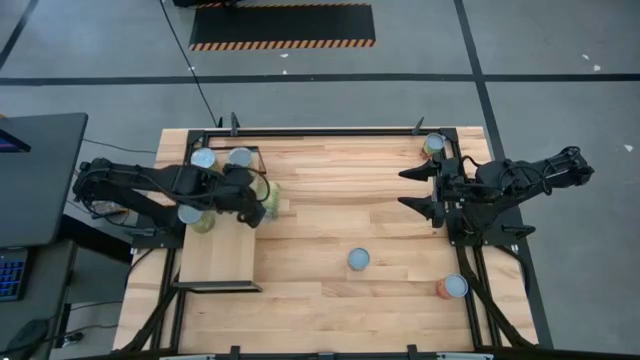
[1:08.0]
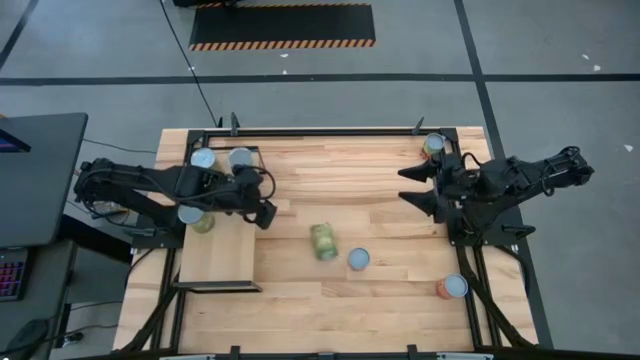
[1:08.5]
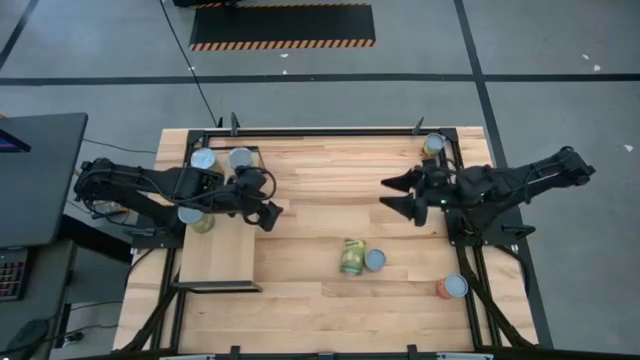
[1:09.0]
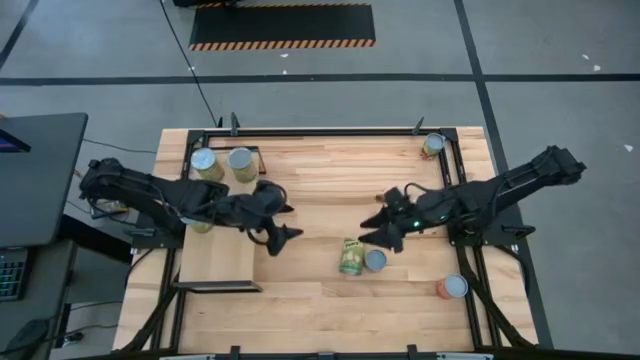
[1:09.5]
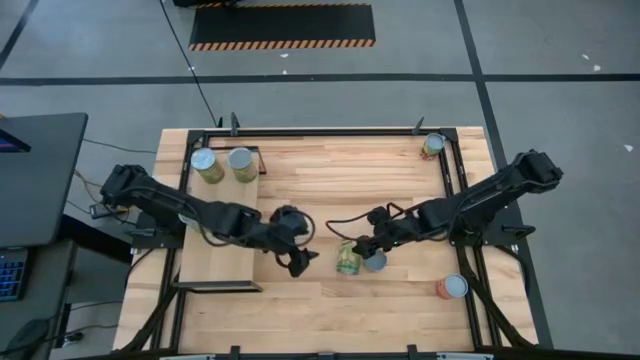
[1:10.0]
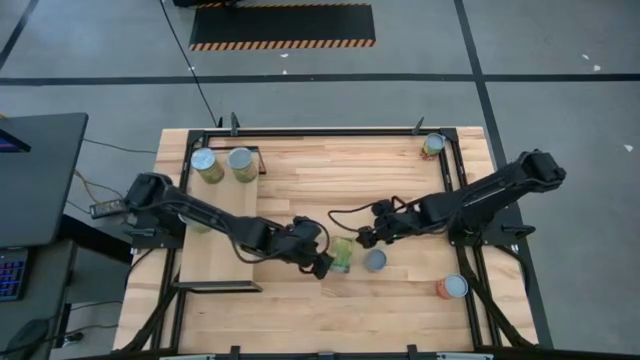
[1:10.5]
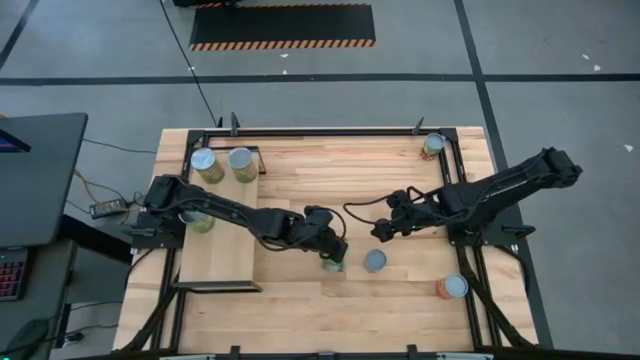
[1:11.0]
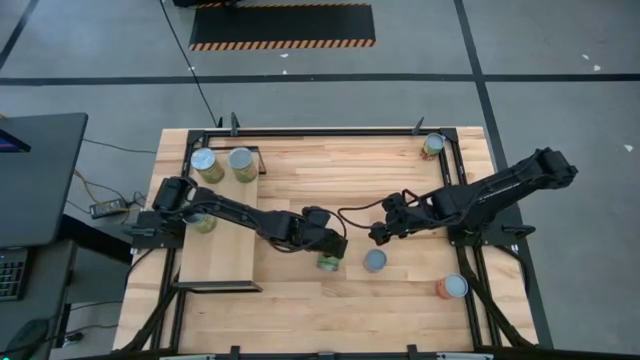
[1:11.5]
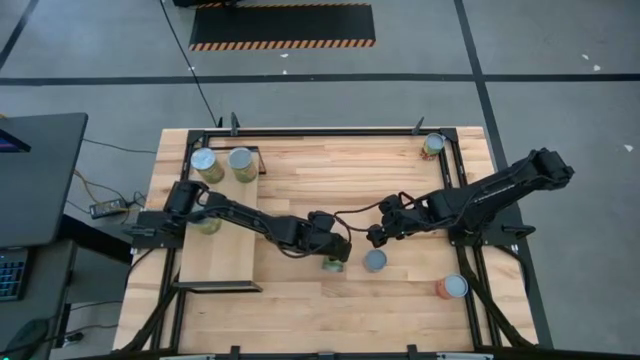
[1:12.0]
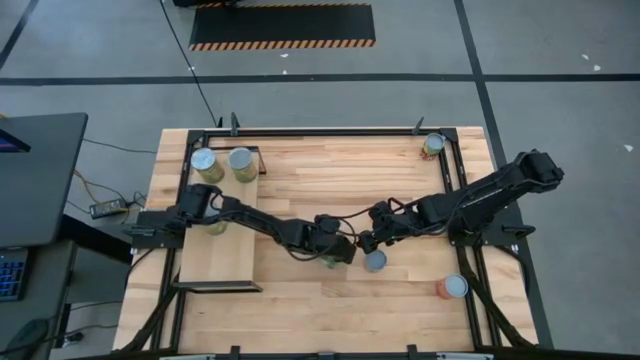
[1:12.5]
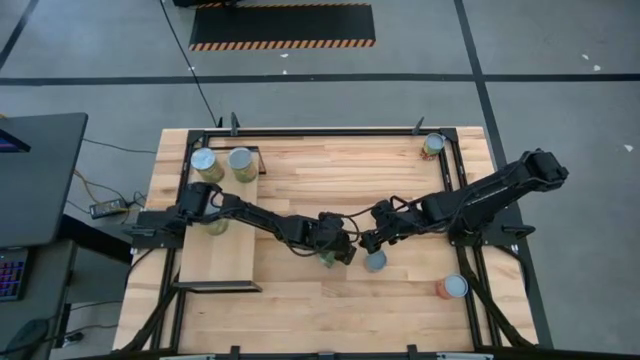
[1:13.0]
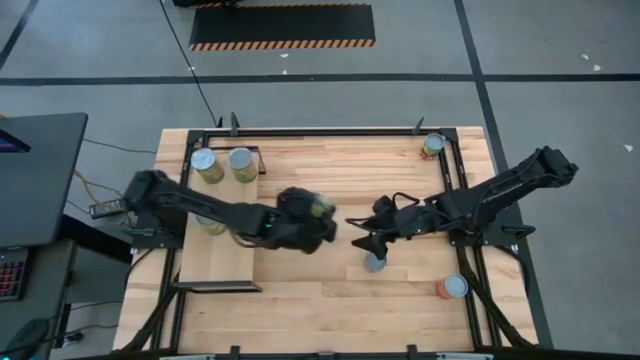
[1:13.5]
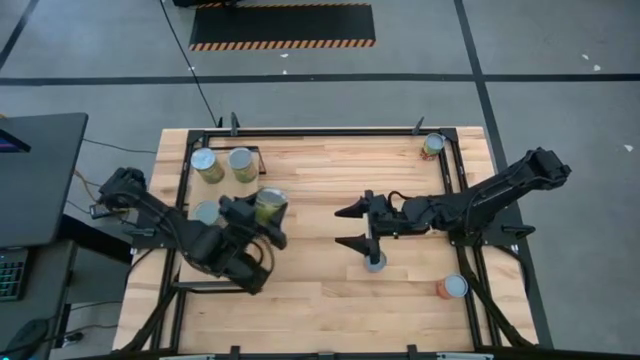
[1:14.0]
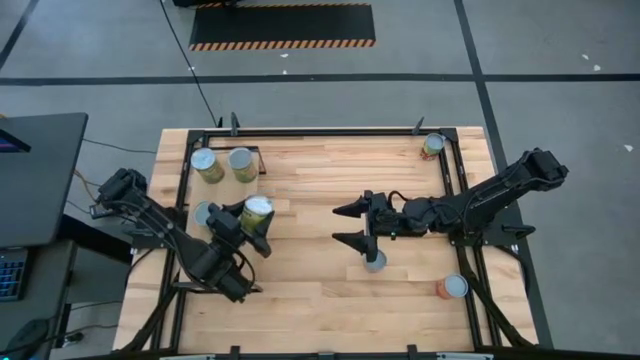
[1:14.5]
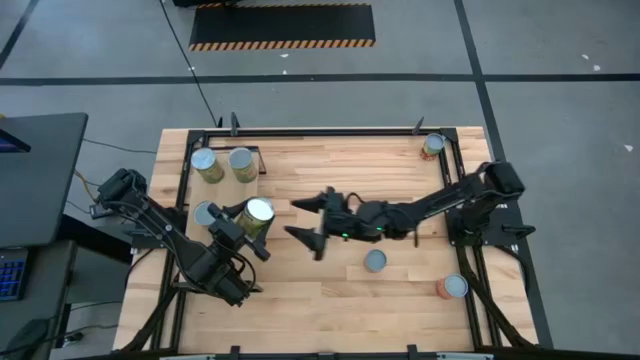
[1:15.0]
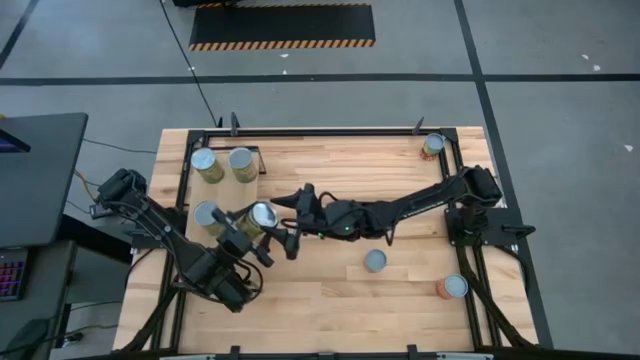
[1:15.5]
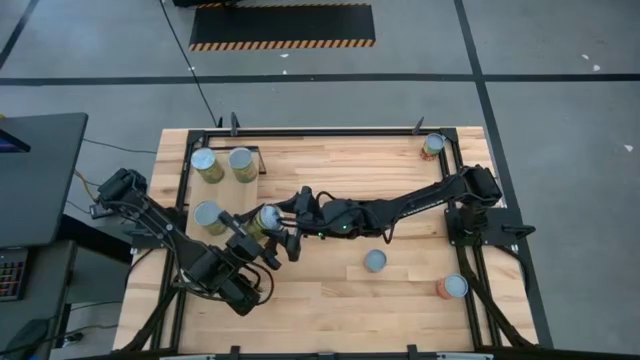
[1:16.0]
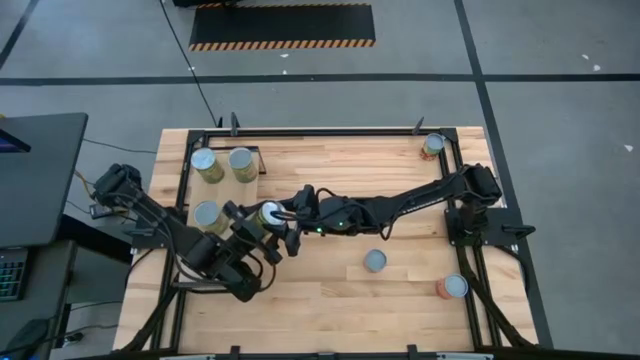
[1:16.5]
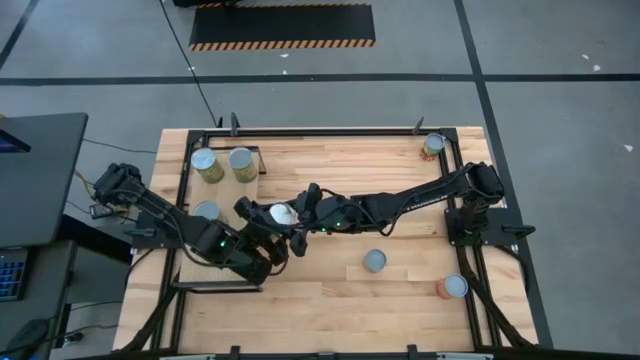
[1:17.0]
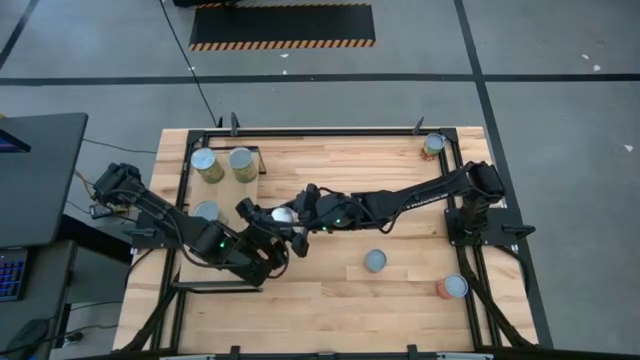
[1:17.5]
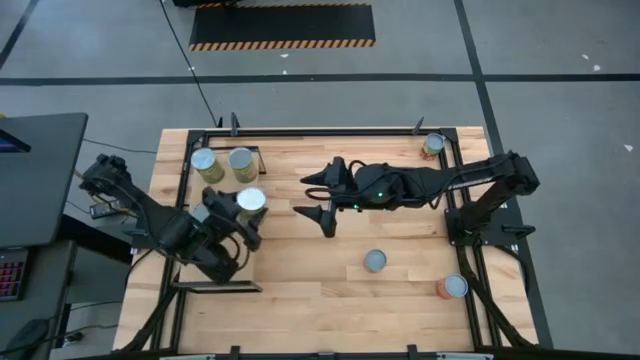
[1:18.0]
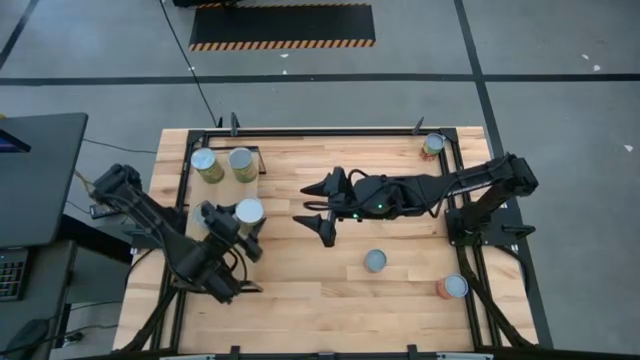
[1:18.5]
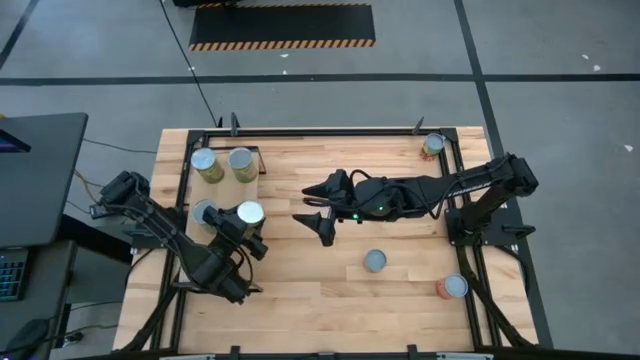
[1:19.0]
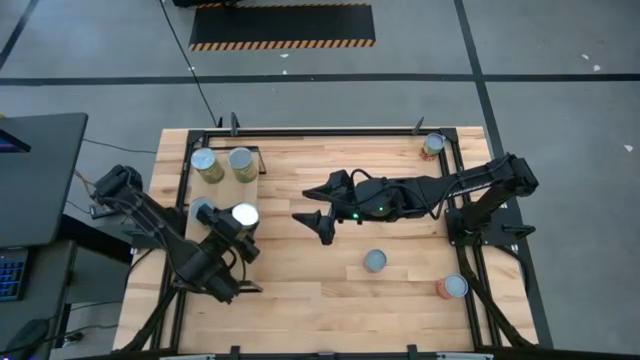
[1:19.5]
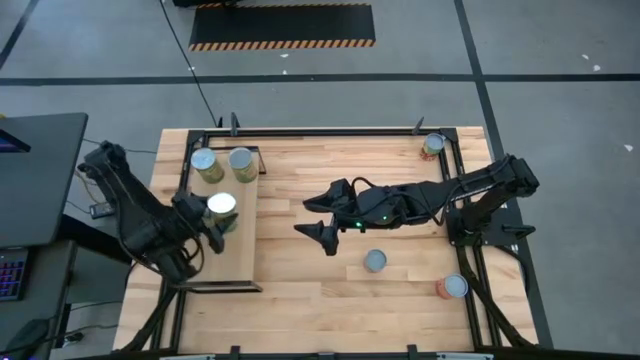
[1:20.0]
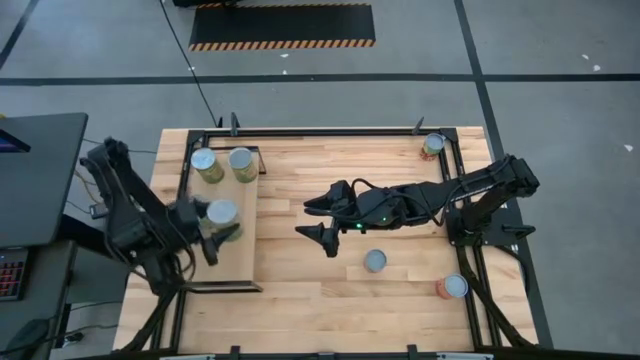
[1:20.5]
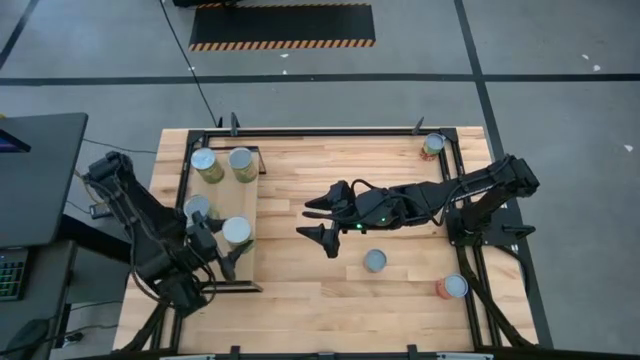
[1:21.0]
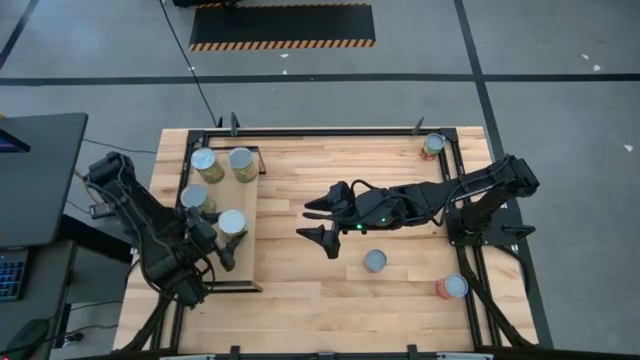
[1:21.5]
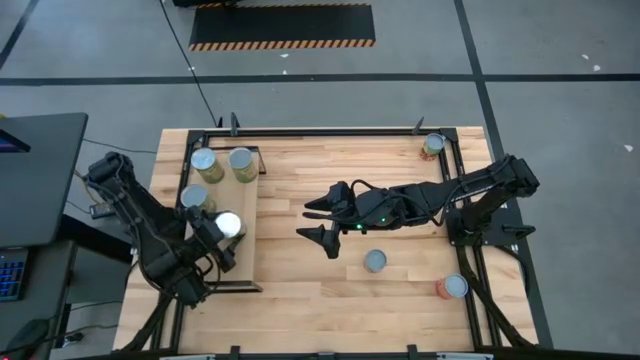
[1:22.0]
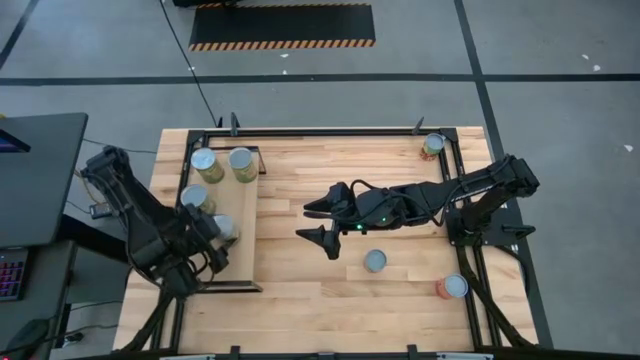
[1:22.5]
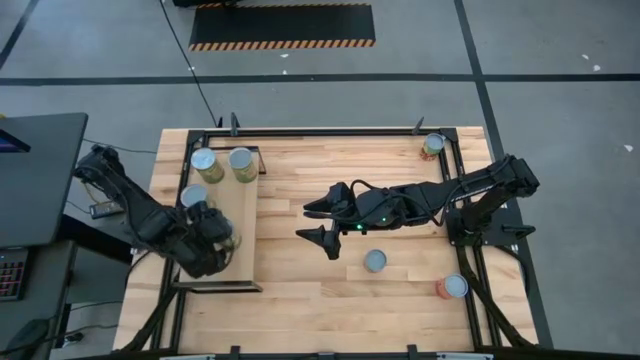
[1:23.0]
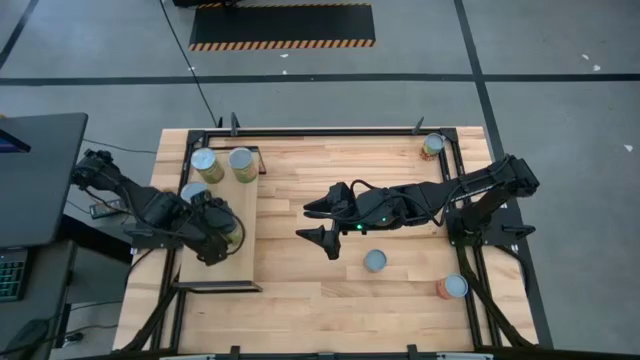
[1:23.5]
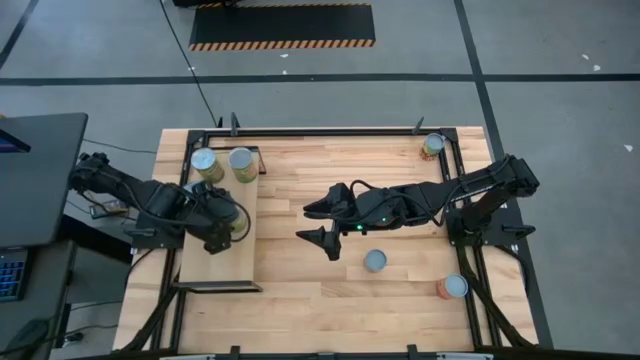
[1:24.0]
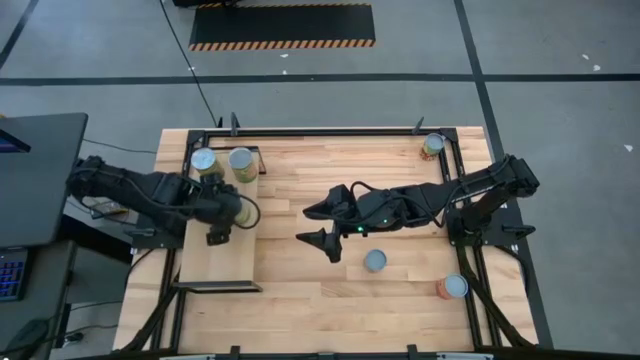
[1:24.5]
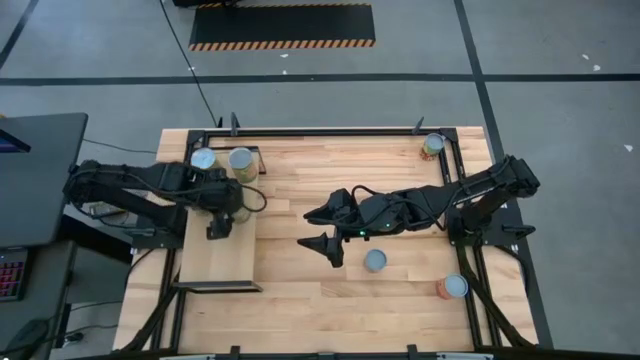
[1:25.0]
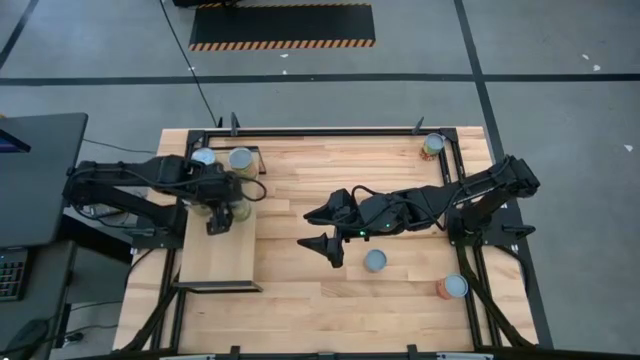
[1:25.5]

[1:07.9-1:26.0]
Task: Pick and place cans onto a shelf
Put the canned pears on the shelf aligned with the other canned pears

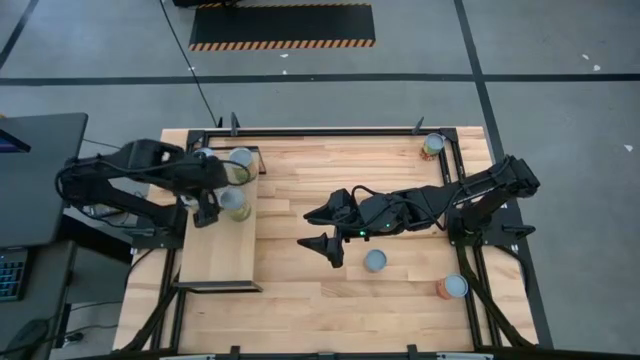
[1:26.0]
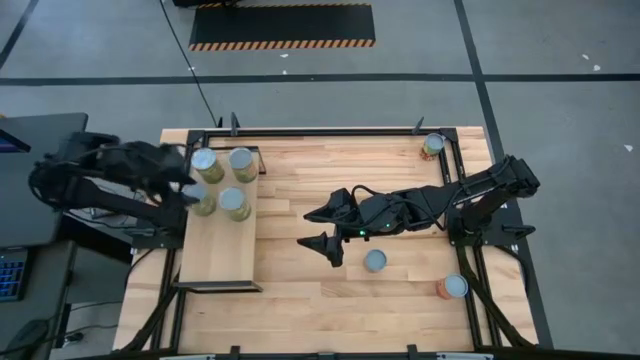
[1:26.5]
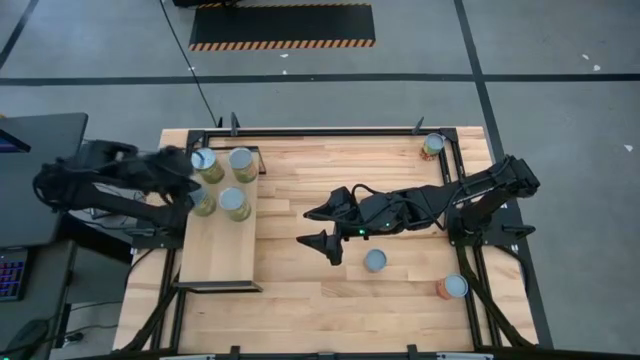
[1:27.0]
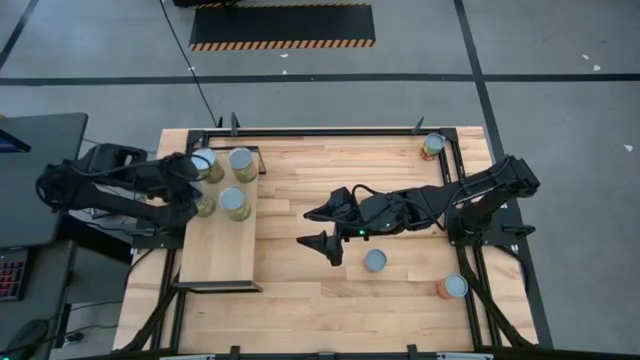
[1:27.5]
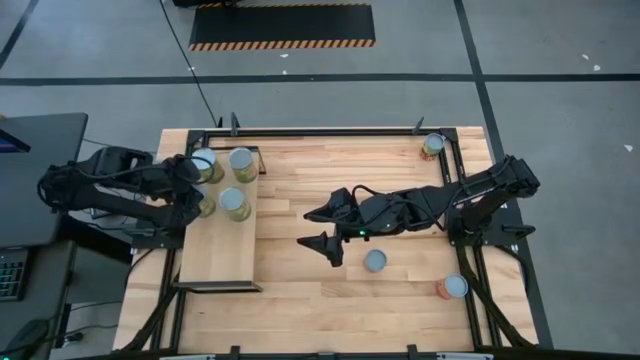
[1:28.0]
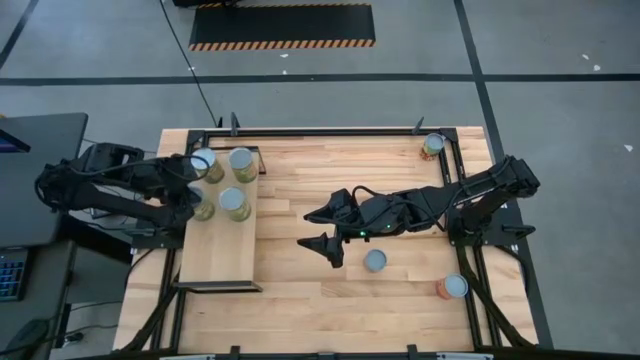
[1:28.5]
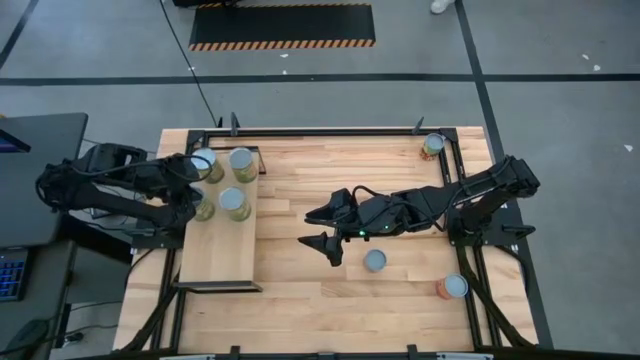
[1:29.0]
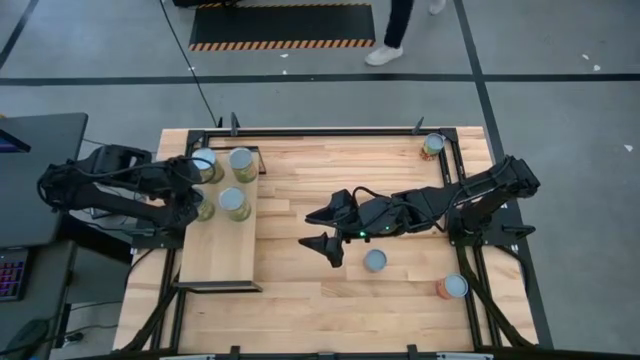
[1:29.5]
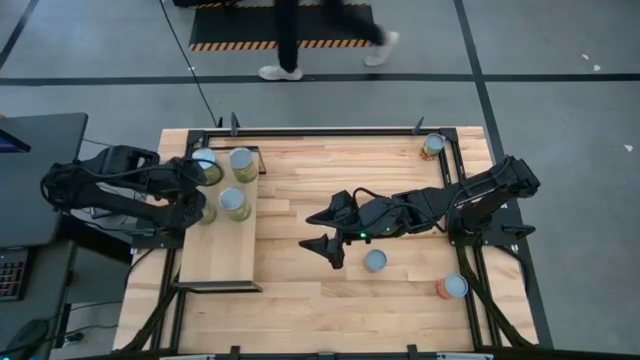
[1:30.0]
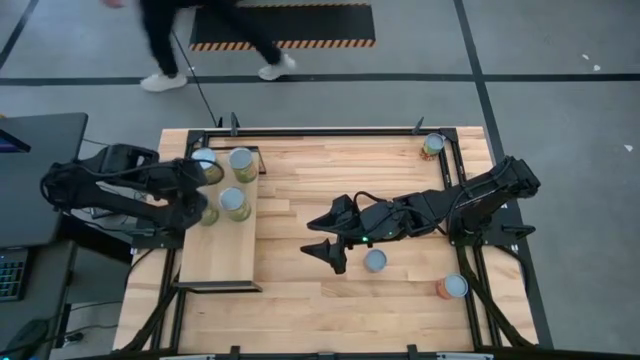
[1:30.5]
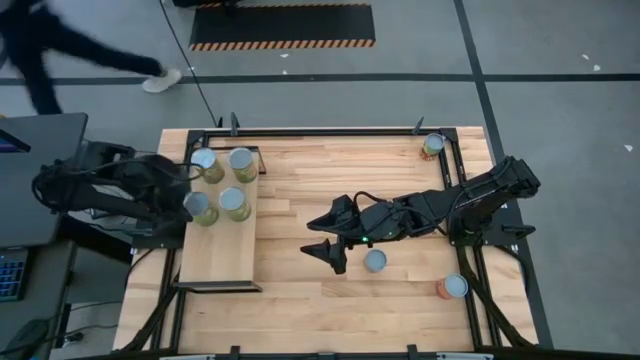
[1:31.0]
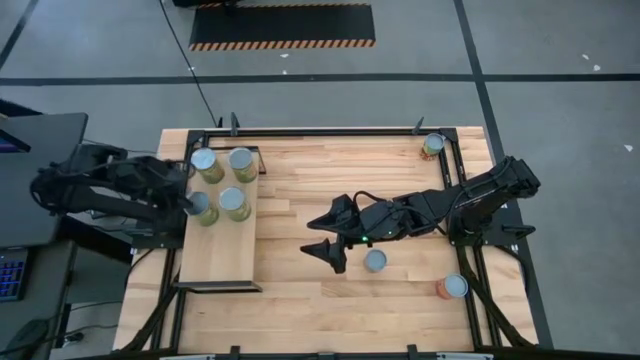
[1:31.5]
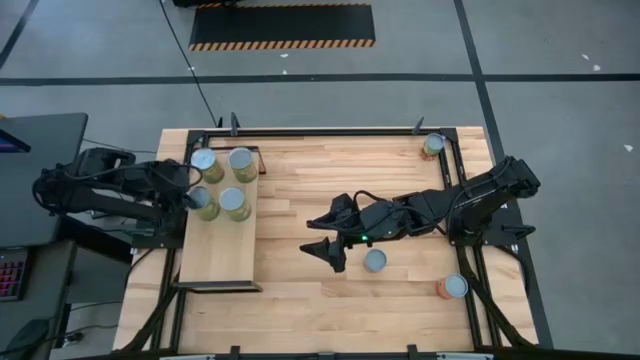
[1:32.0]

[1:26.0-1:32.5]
Adjust the canned pears on the shelf
